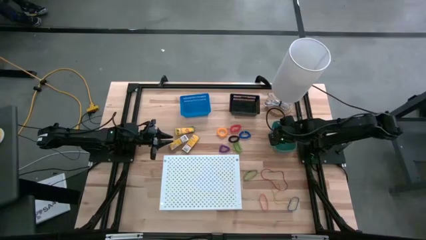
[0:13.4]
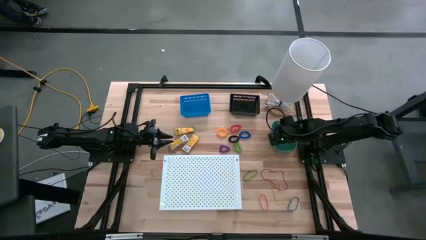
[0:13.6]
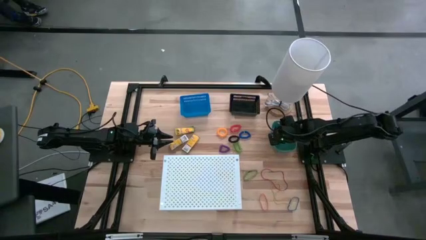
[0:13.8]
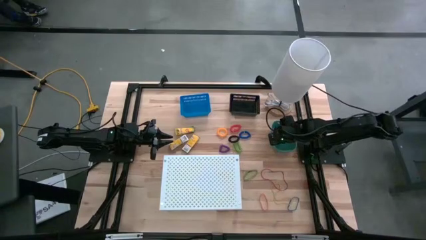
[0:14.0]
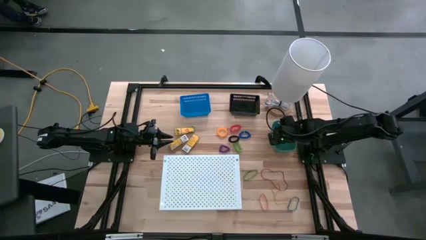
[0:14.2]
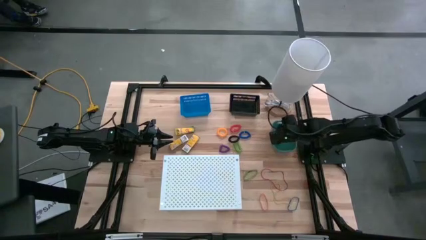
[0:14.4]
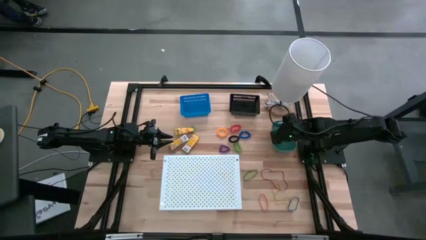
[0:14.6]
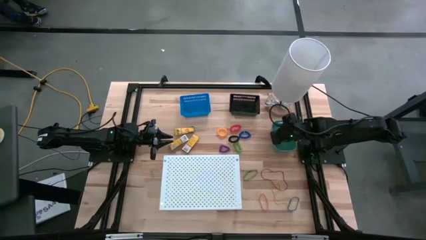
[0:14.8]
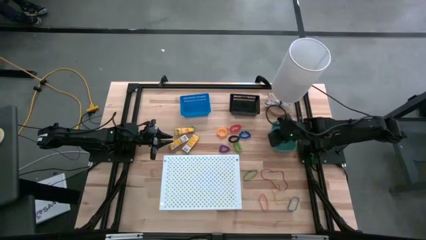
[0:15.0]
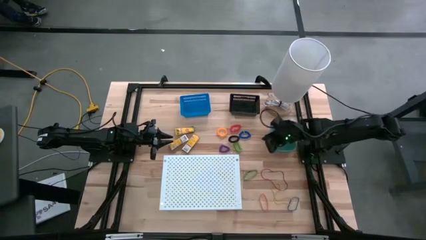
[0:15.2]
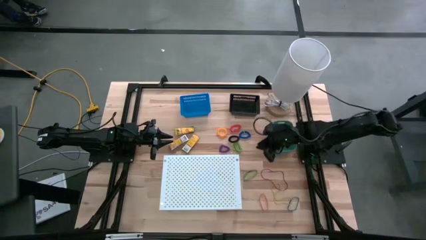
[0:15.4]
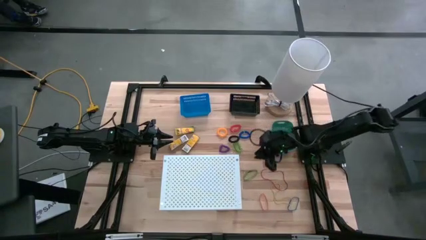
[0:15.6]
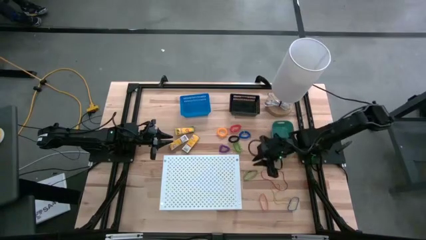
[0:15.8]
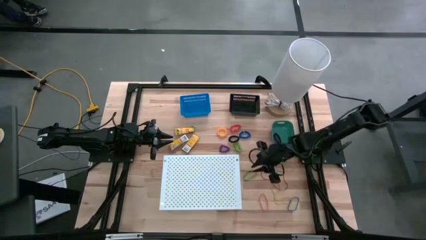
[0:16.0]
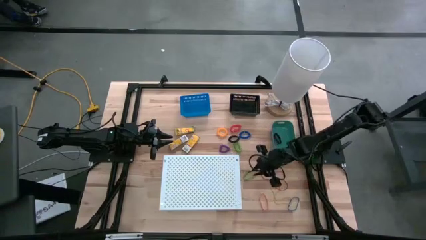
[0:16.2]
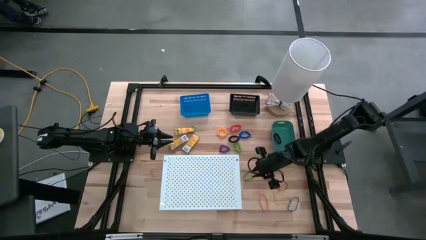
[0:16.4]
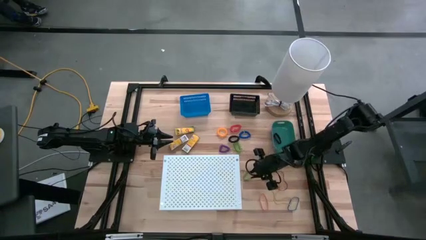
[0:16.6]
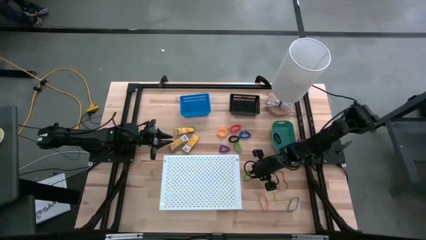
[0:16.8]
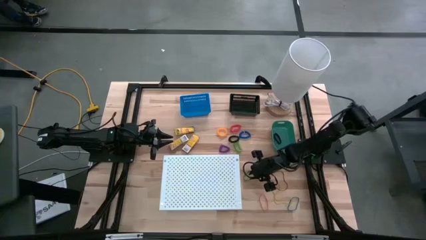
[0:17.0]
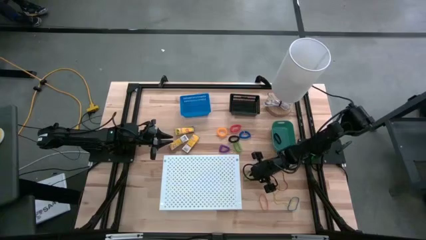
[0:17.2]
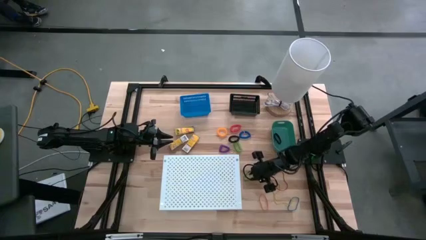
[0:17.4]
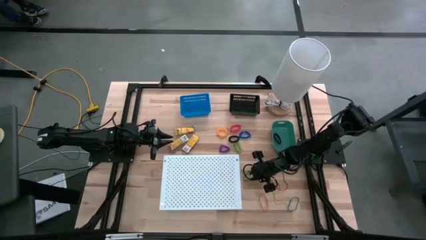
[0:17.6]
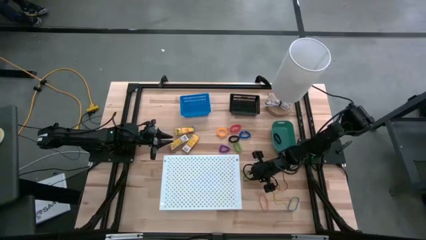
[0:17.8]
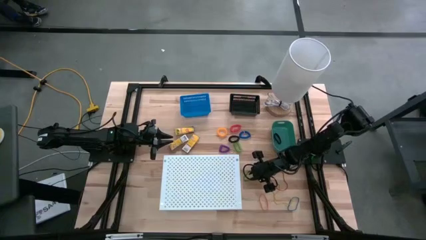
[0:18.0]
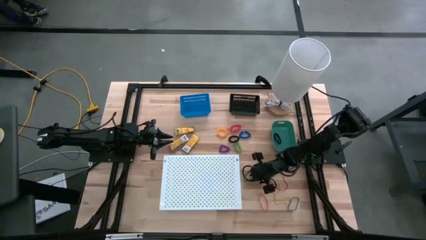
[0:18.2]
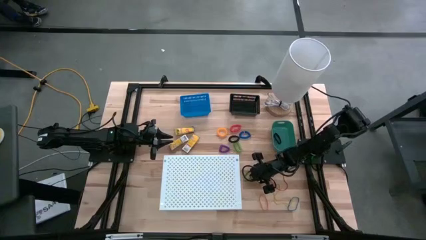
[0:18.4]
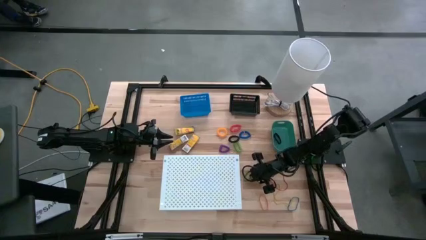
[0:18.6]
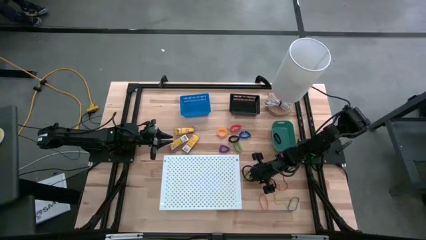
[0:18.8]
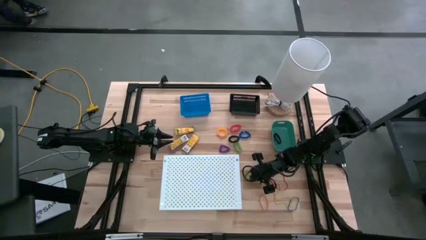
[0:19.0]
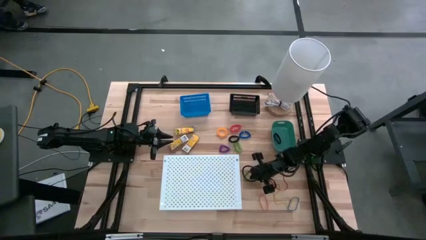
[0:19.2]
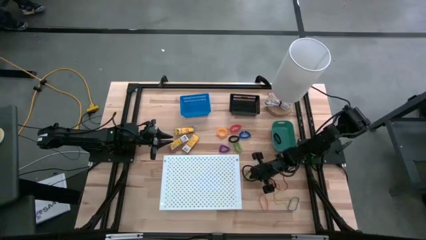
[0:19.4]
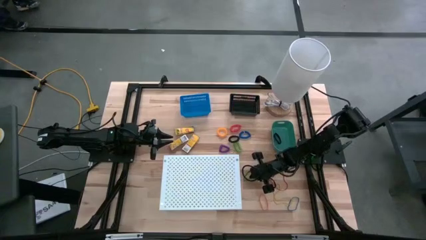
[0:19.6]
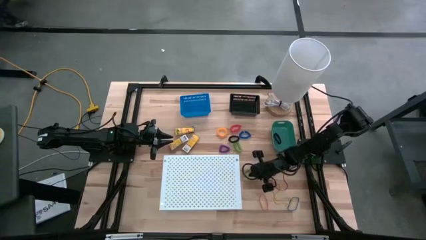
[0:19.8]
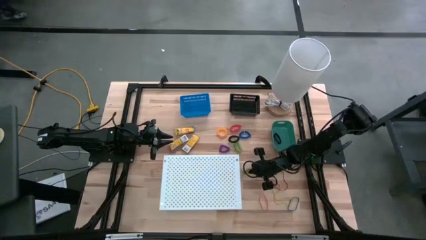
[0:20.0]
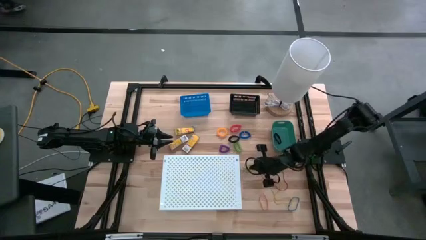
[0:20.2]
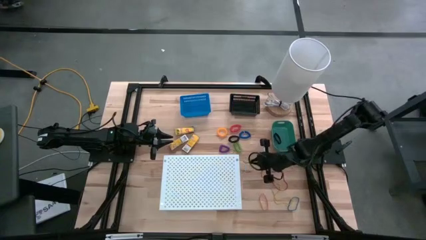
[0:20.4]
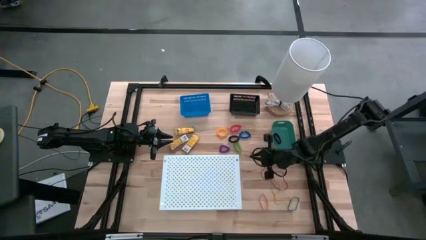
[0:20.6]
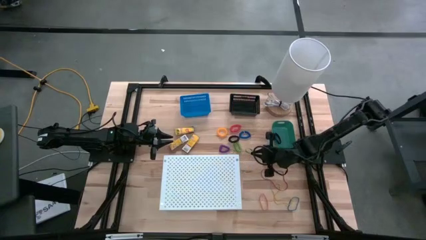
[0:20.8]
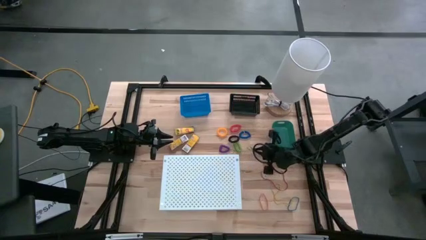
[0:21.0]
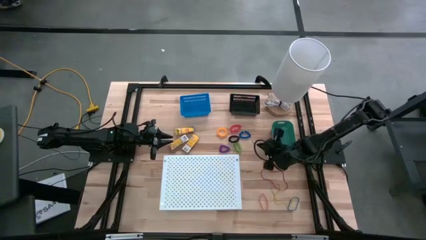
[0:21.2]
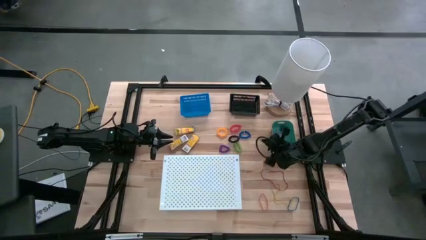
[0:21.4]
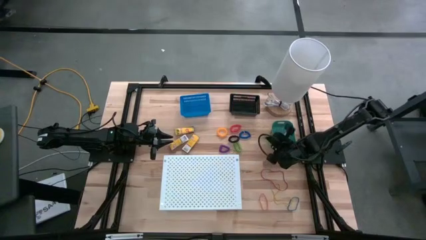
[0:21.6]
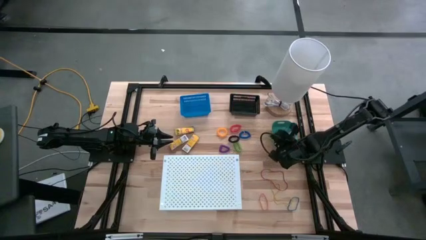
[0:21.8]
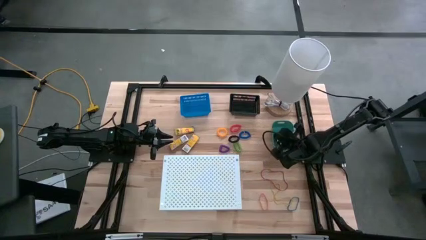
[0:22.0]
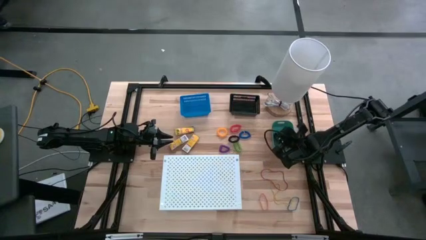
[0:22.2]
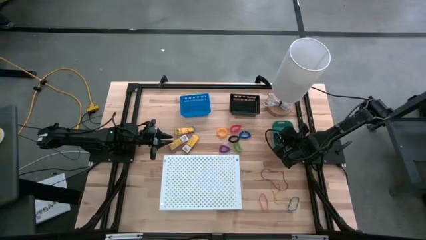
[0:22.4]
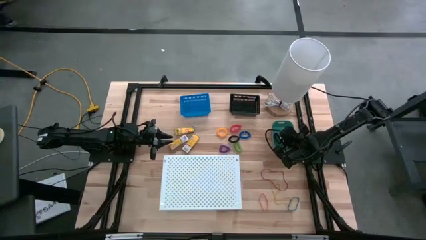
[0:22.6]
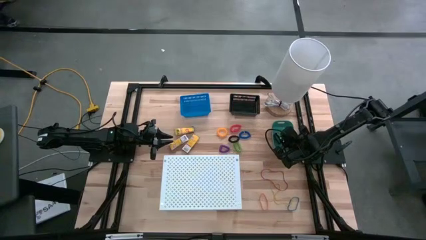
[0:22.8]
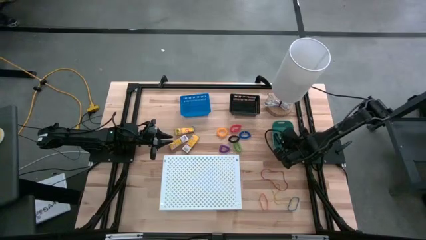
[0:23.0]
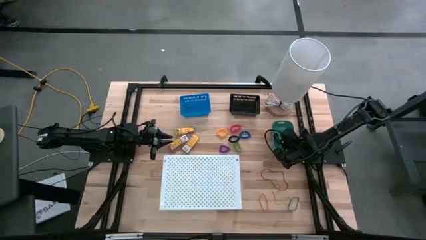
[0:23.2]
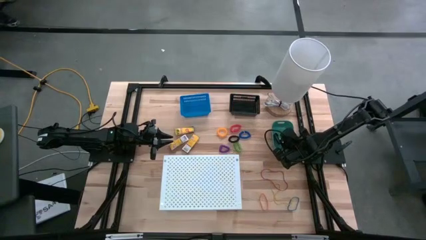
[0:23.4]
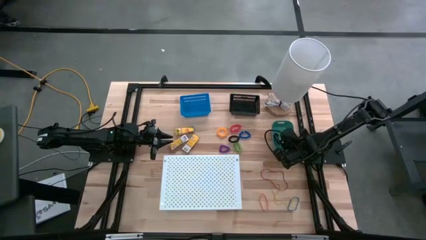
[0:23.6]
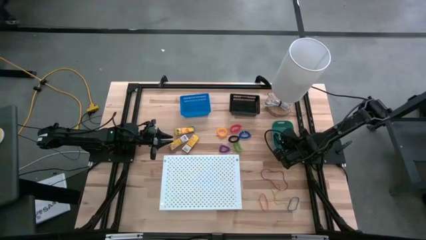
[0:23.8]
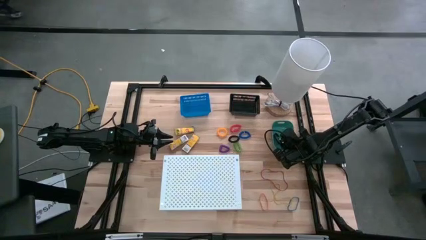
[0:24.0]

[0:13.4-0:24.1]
Task: Pick & Place Office Desk Supplies
Put the green rubber band into the green bin
